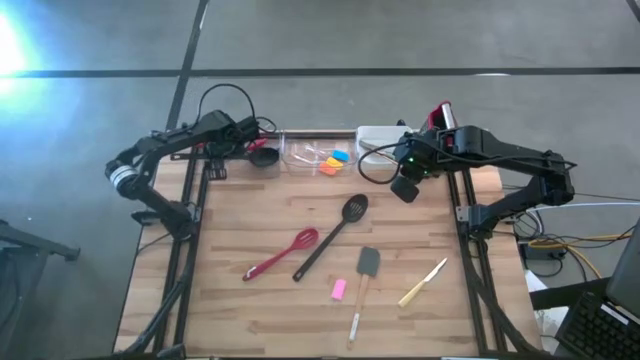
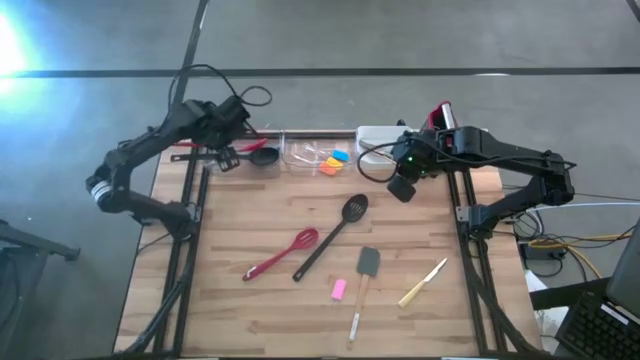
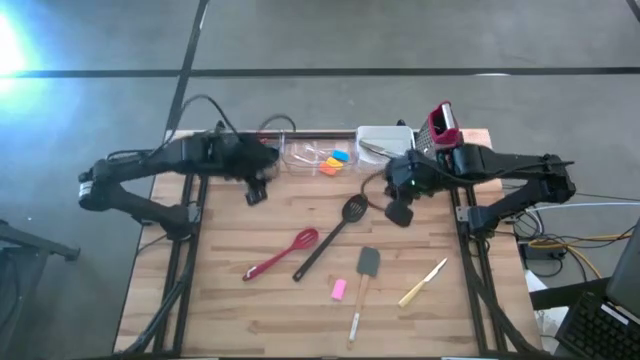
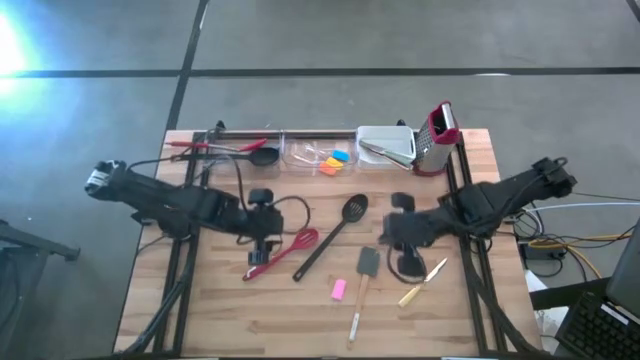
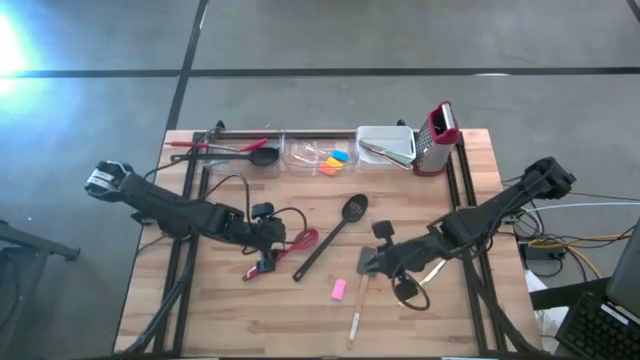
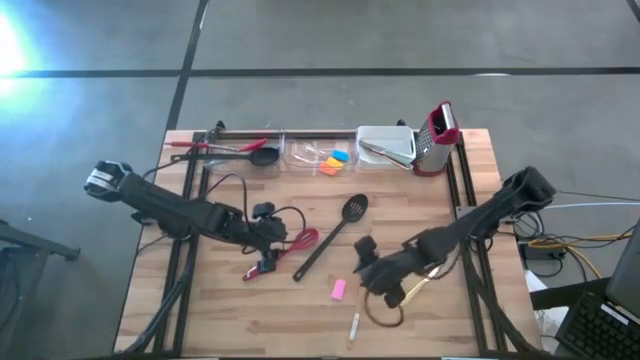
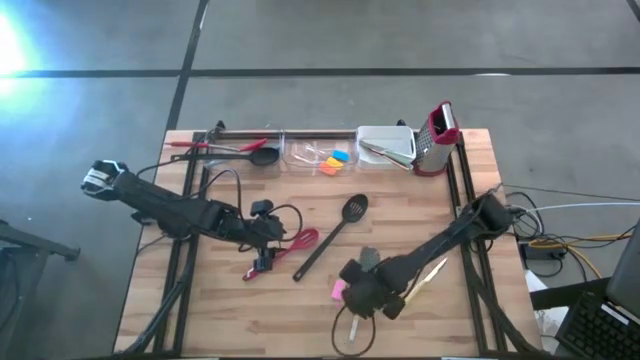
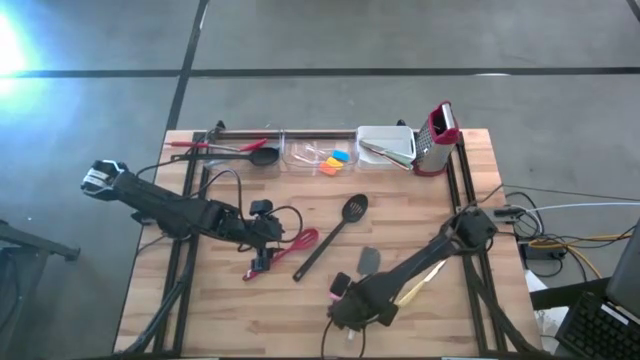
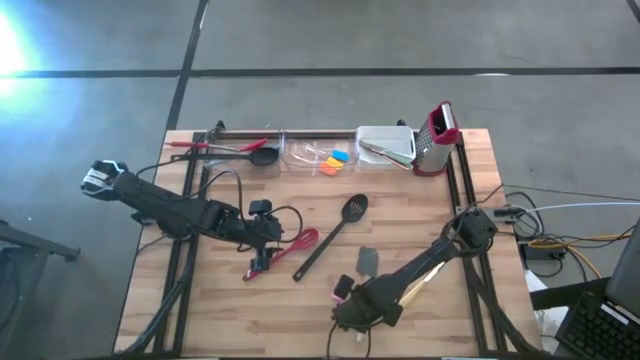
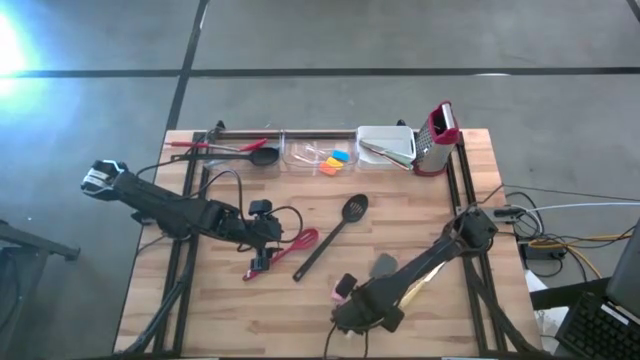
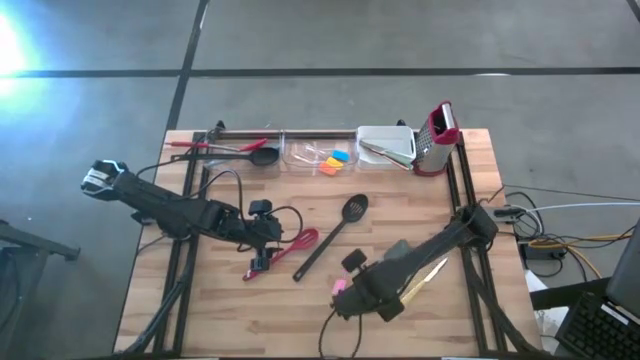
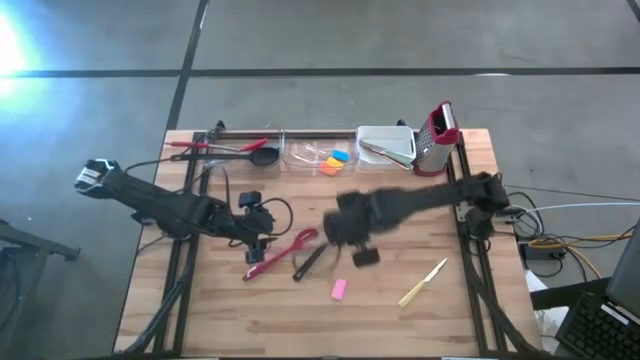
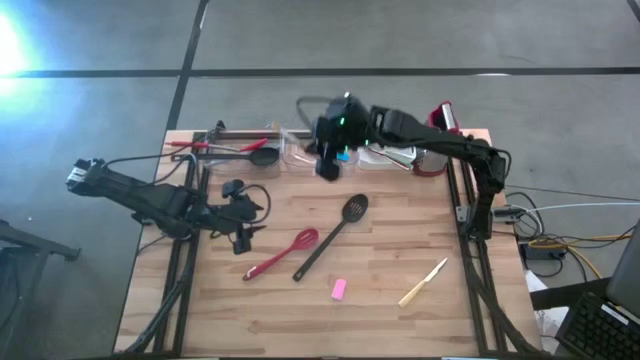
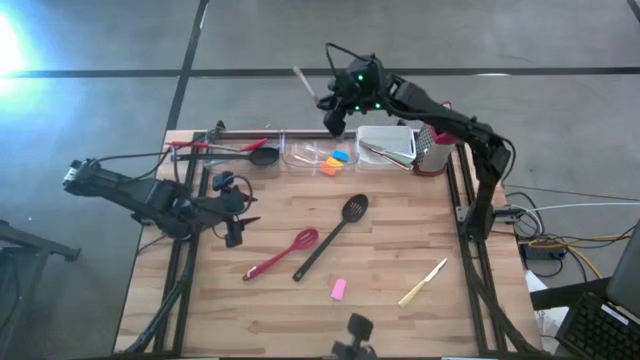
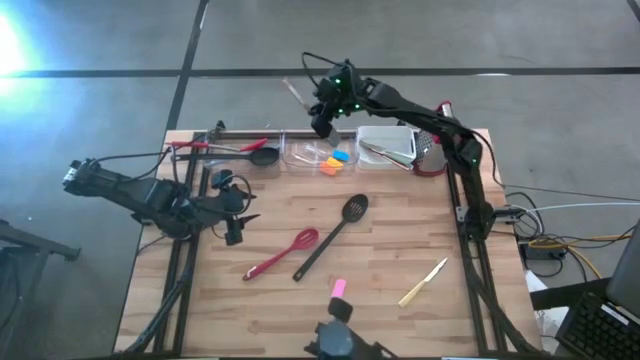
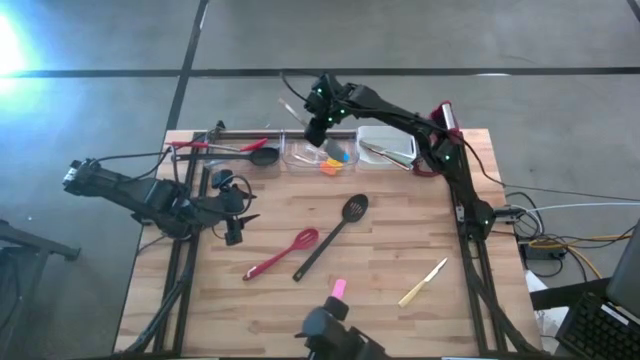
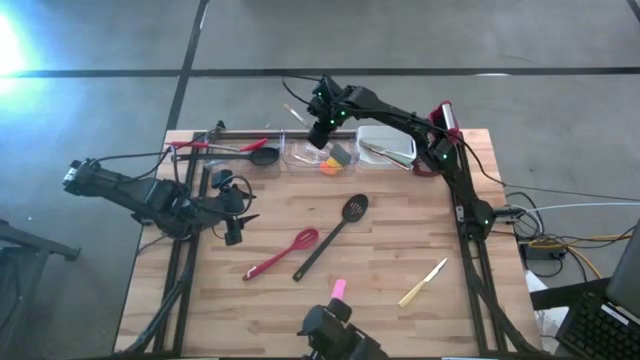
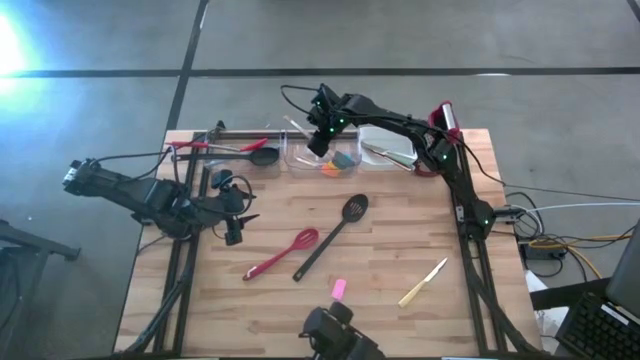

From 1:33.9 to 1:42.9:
Task: Pick & Place Kitchen Items
Put the gray spatula into the right transparent bin

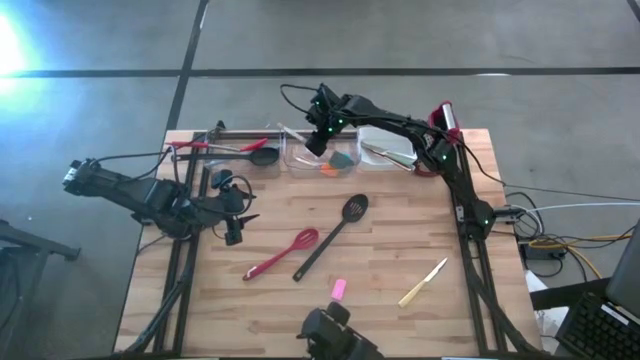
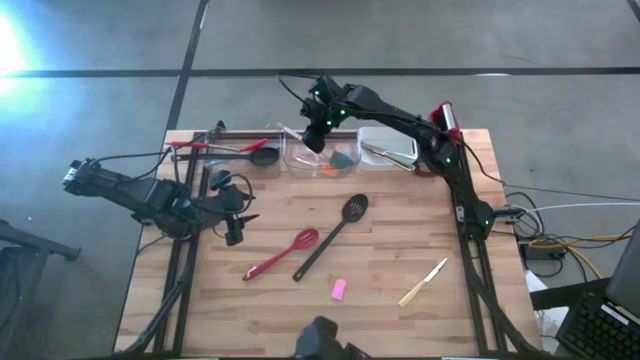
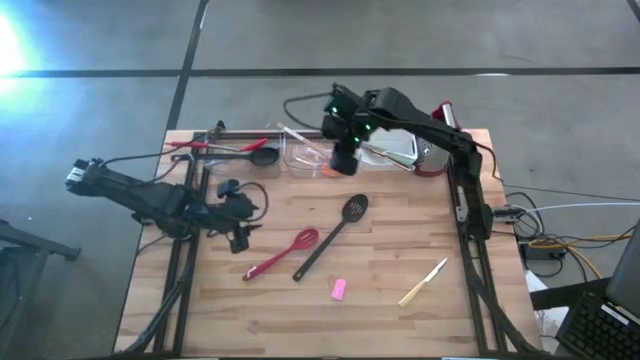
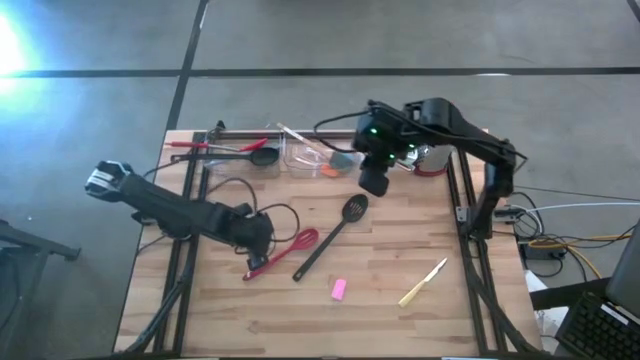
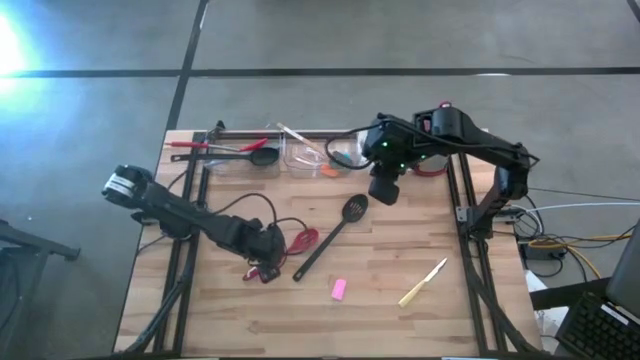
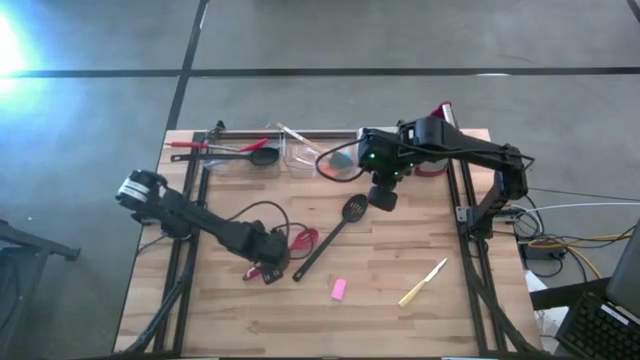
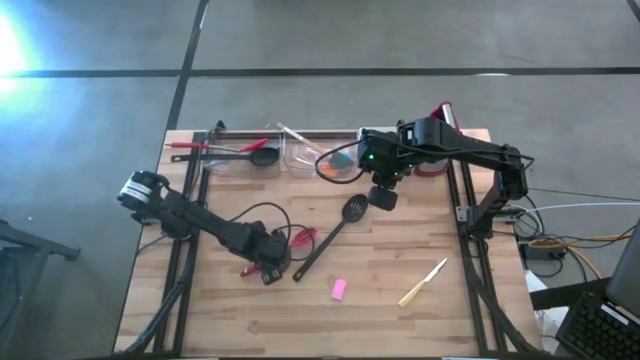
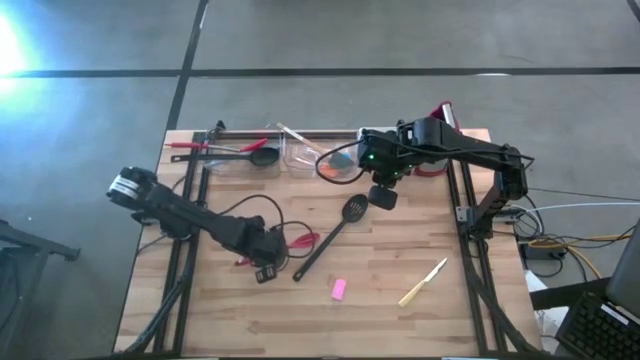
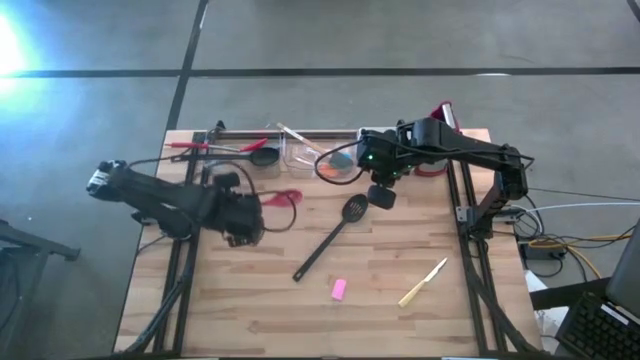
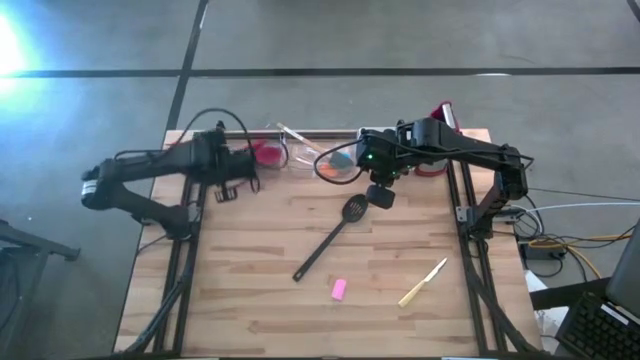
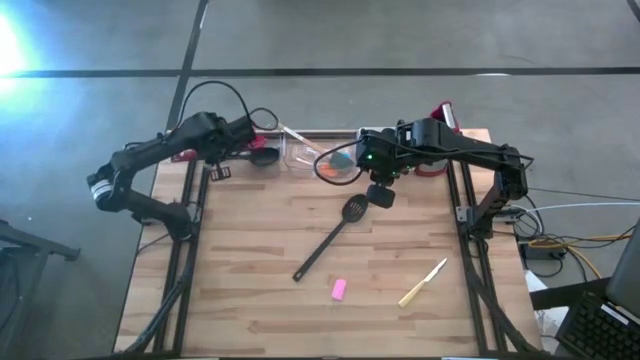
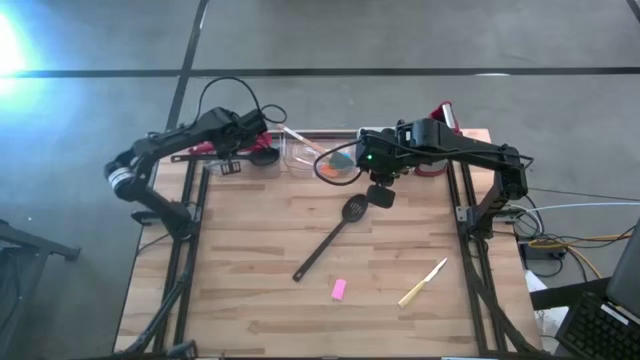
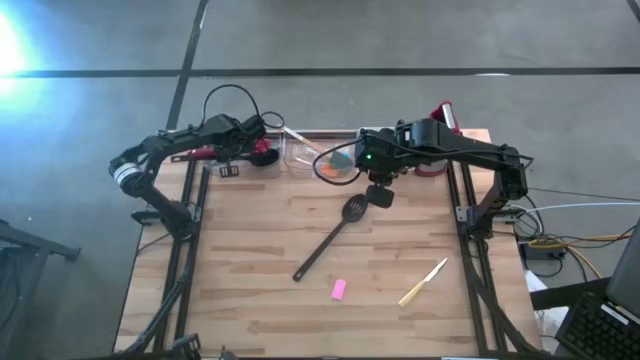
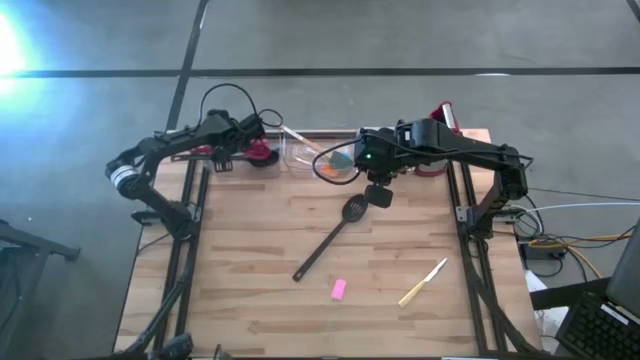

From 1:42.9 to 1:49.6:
Put the red serving spoon into the left transparent bin

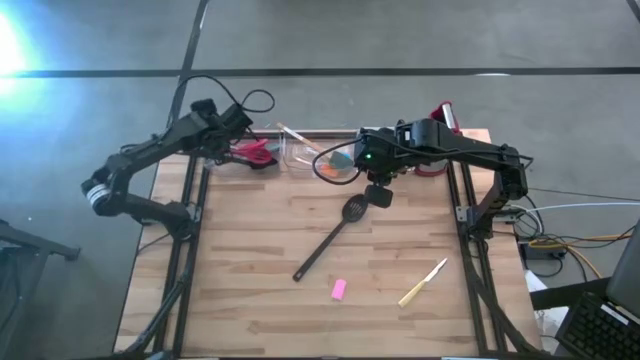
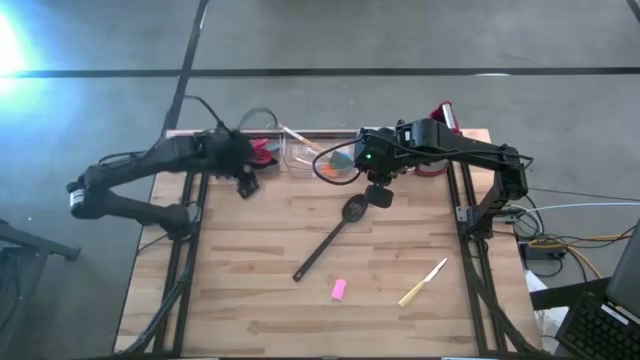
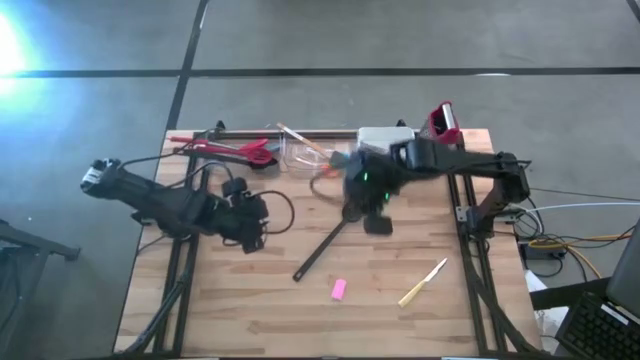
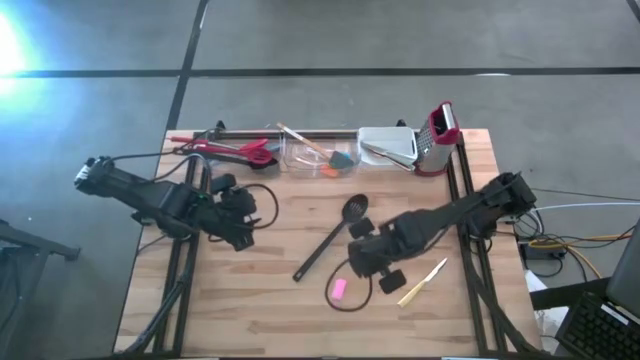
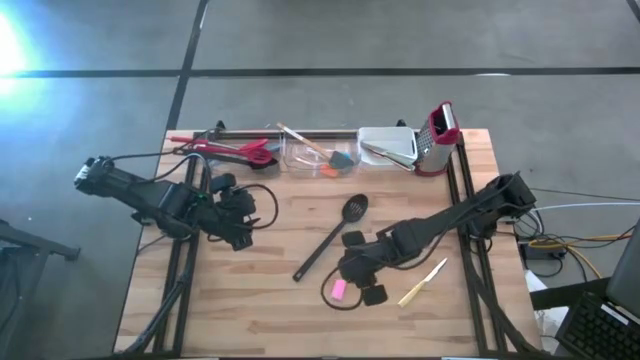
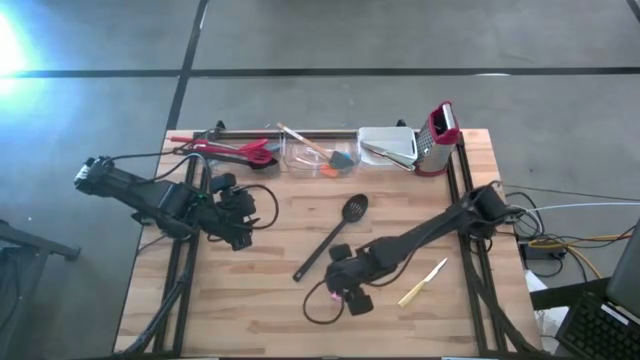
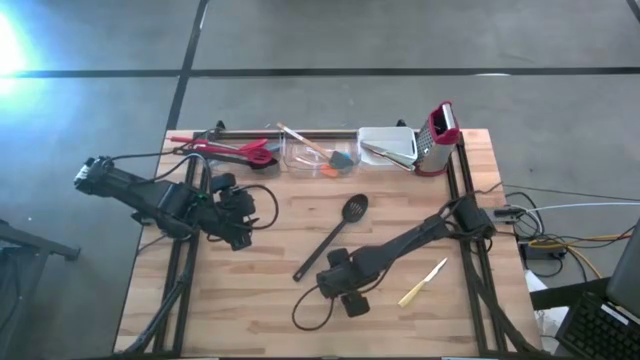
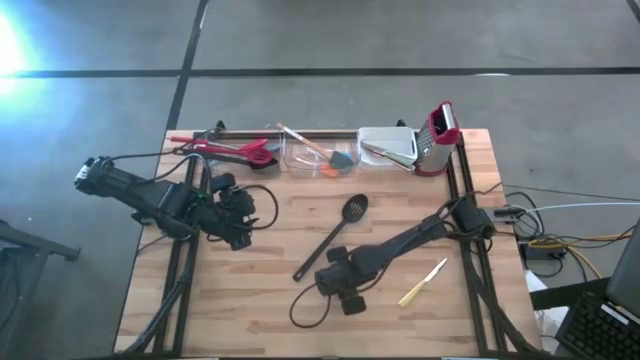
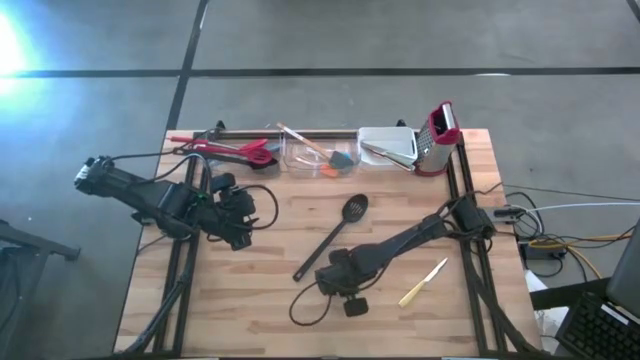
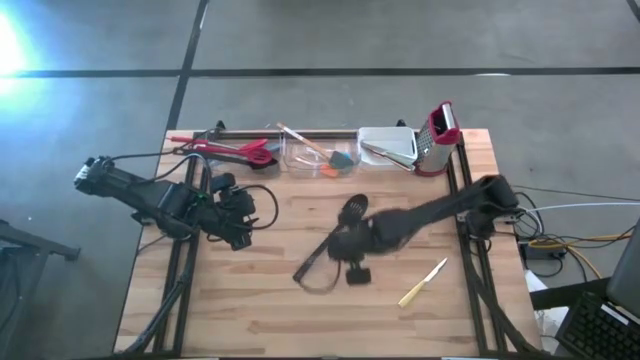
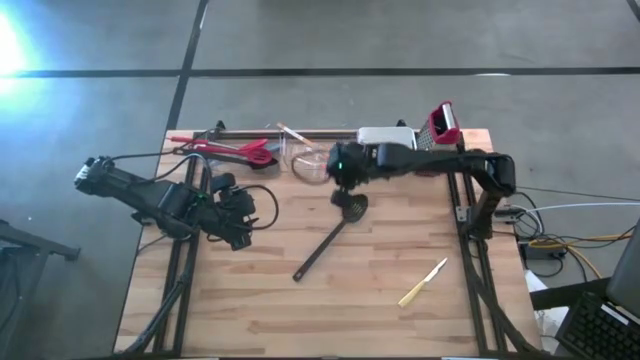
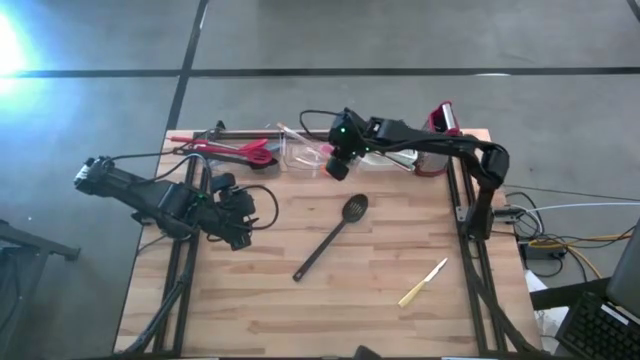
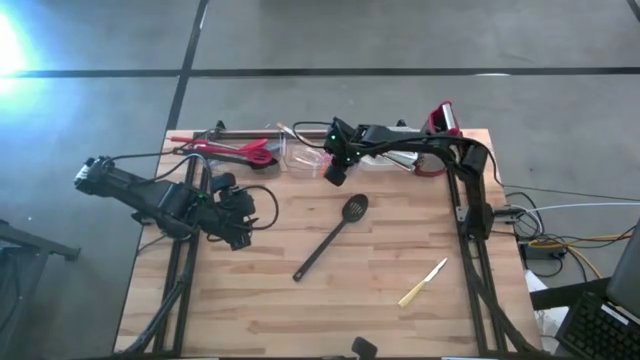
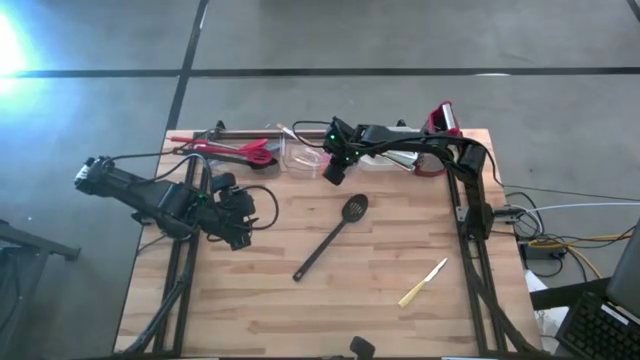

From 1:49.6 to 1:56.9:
Put the pink spatula into the right transparent bin
